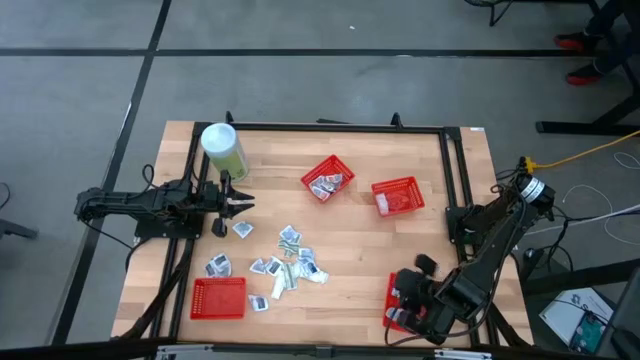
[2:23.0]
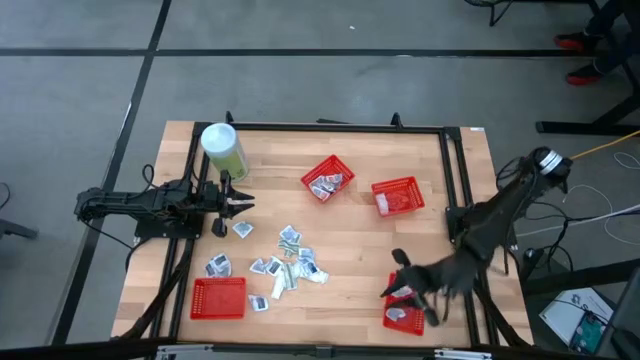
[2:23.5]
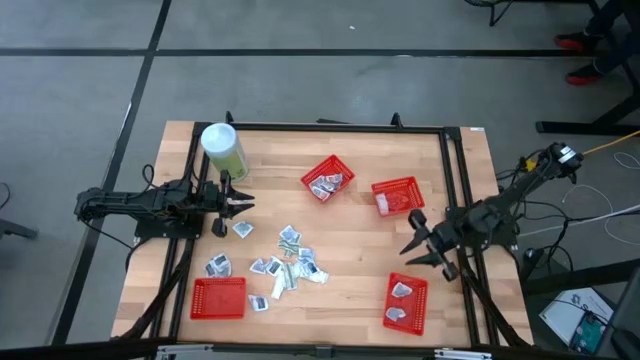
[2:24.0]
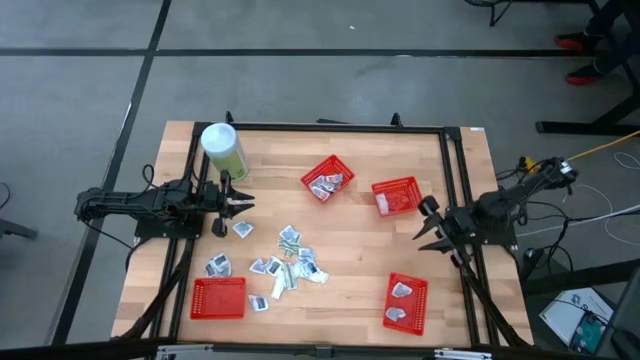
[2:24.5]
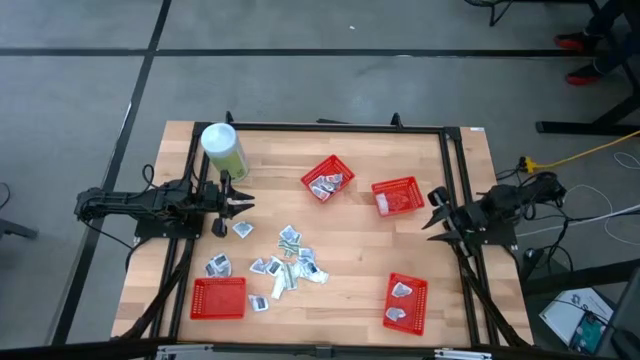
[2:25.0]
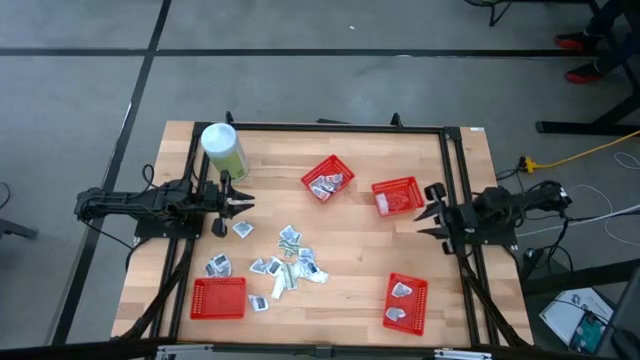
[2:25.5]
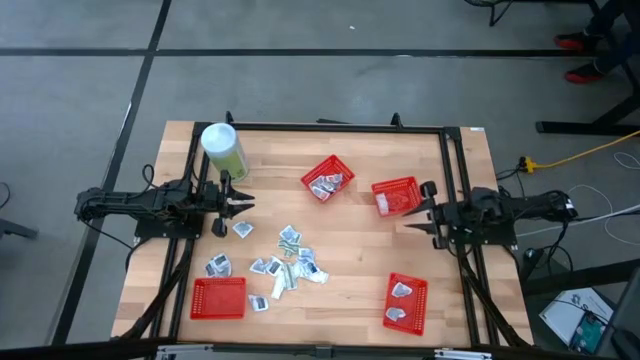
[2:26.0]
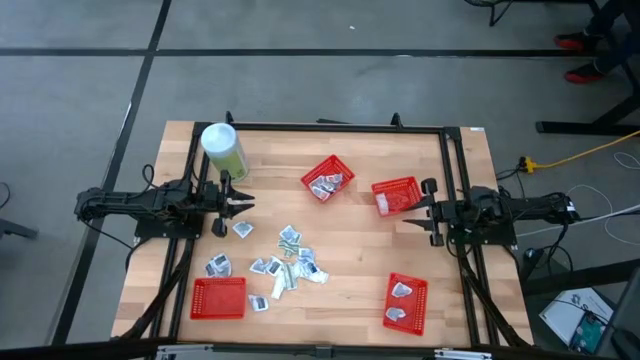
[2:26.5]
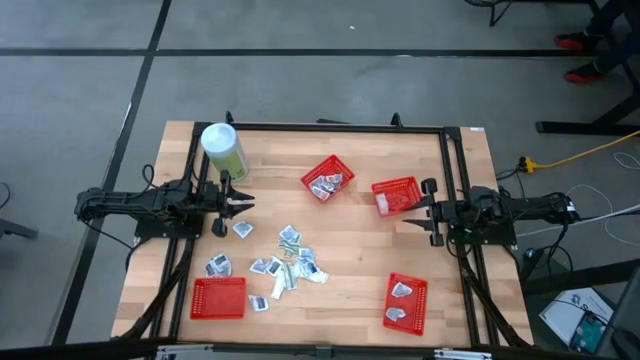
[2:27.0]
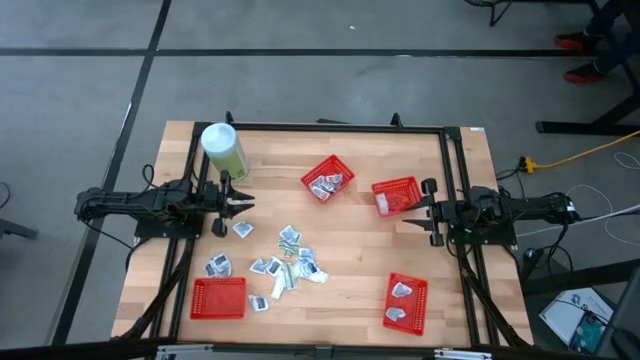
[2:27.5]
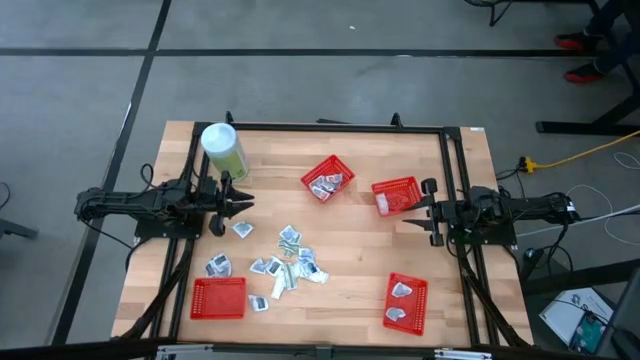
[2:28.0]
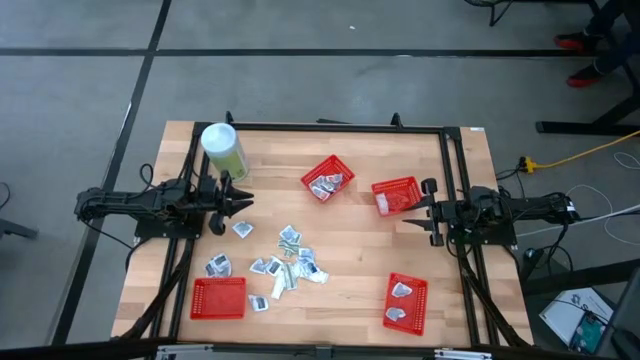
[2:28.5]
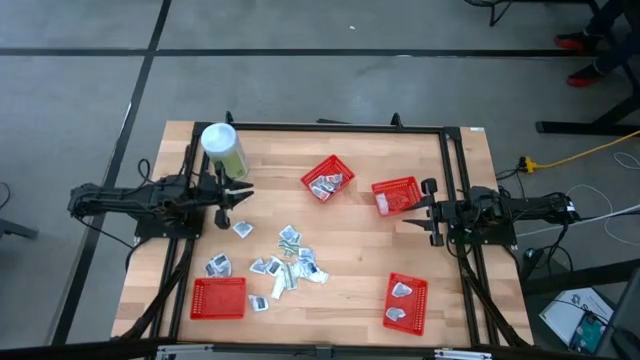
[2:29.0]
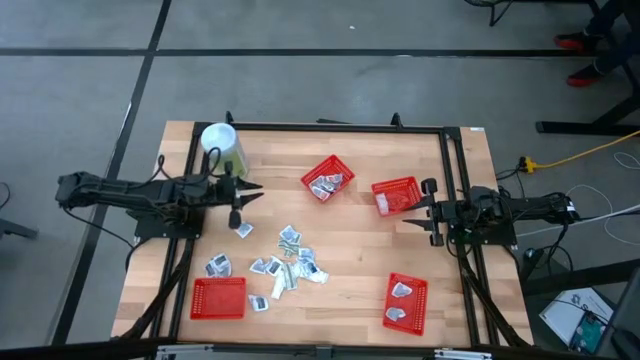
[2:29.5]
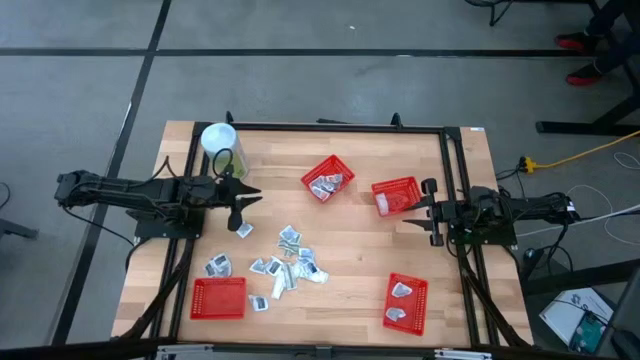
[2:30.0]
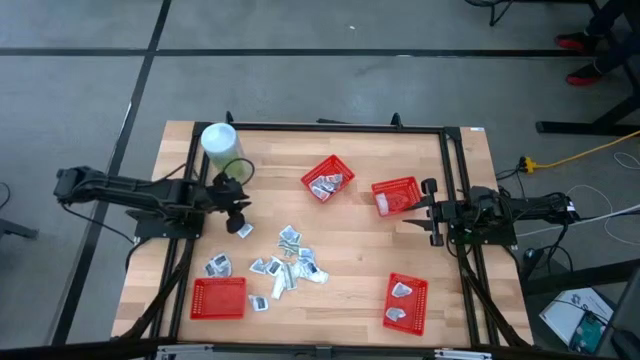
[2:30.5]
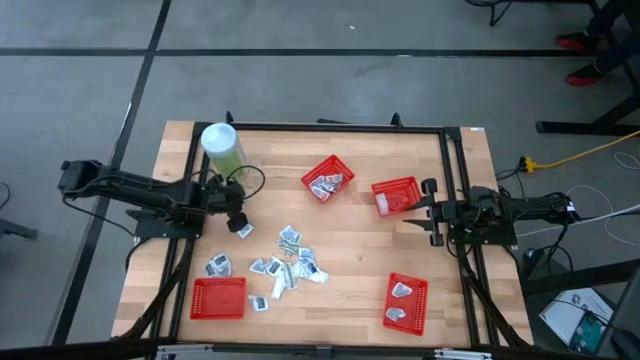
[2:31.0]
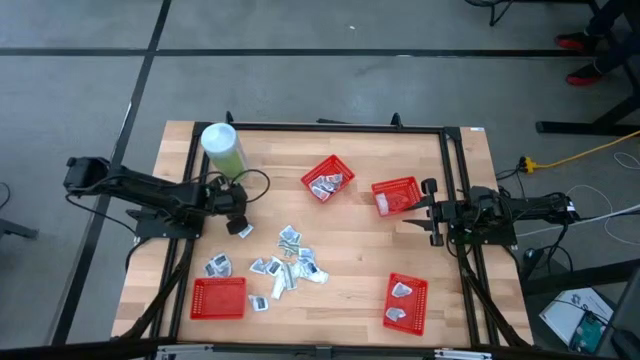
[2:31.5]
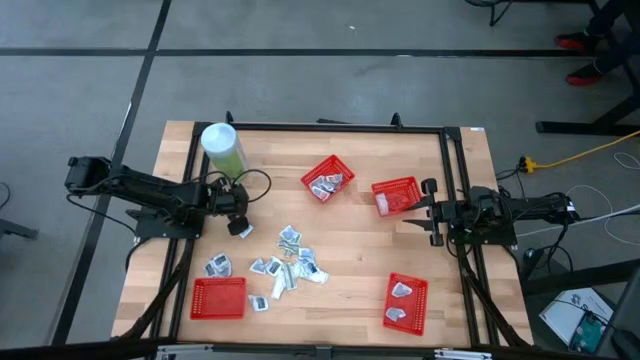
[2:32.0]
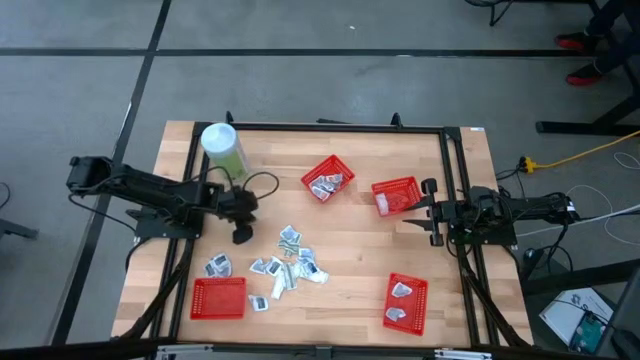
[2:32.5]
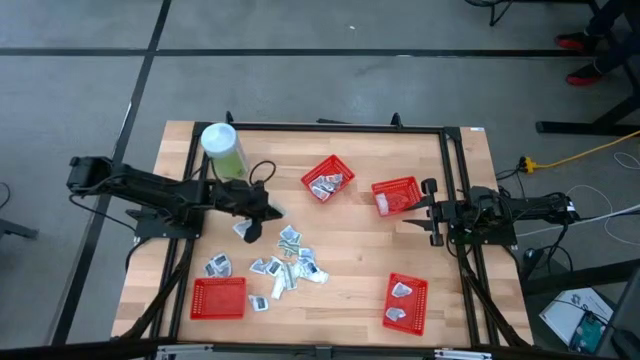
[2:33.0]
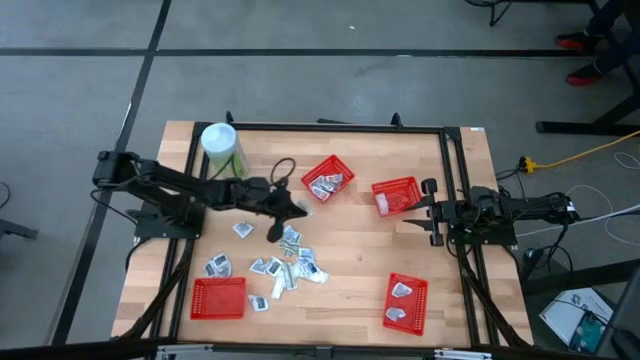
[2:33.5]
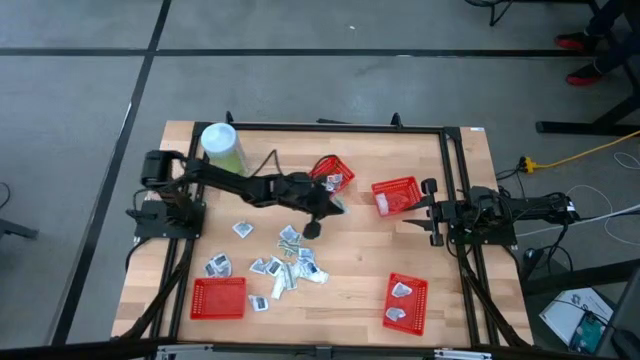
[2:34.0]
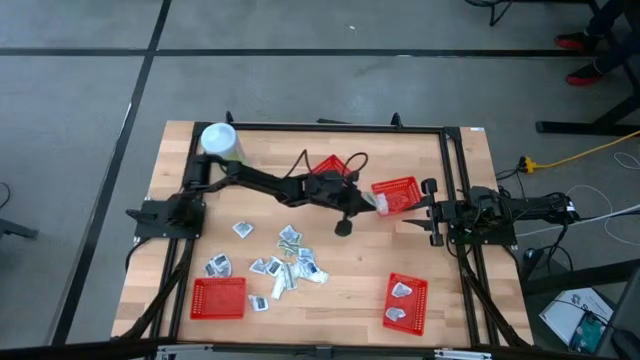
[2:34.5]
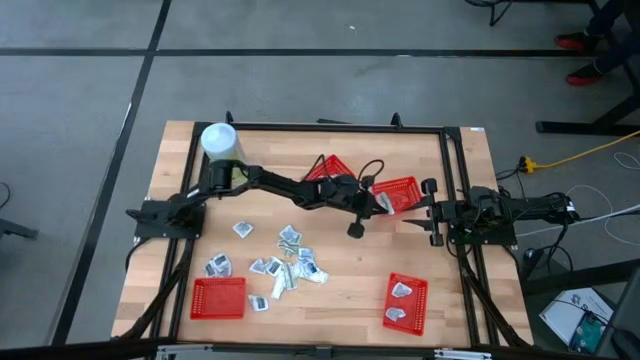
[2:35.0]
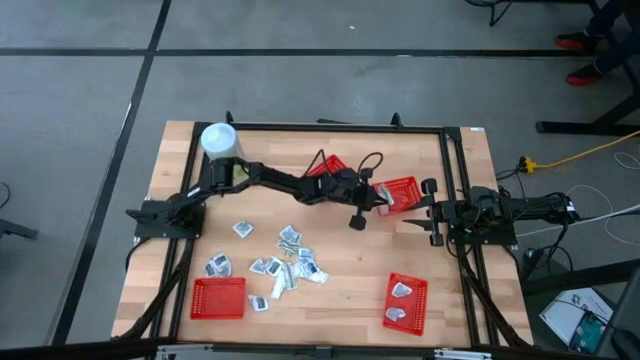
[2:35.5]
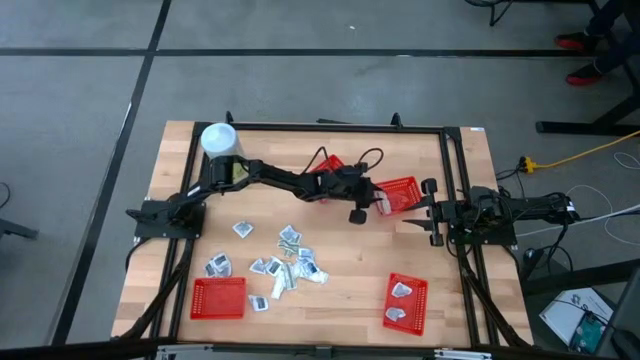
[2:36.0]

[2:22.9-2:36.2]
Task: Pick & Place First Aid Supplies
Put the green bandage into the red container

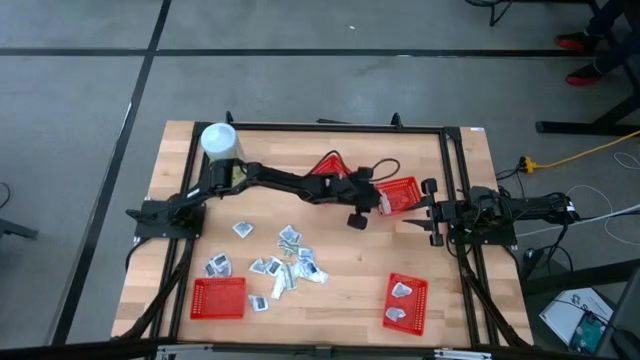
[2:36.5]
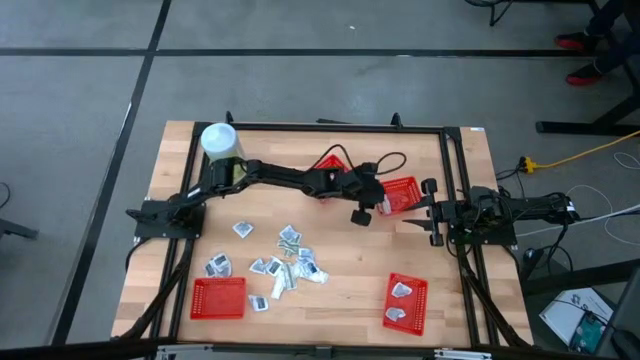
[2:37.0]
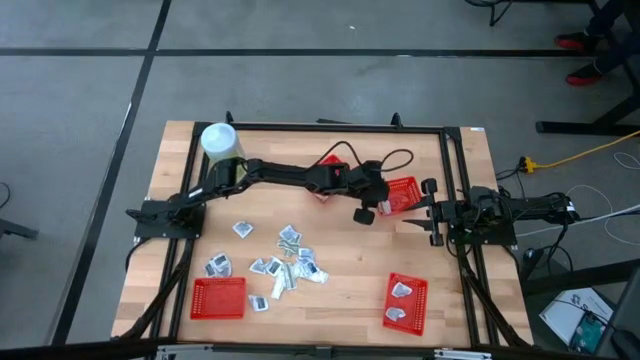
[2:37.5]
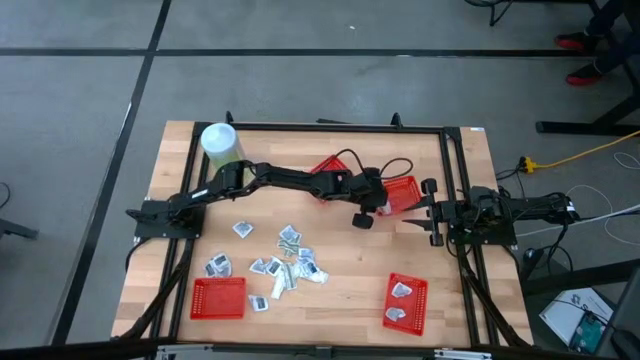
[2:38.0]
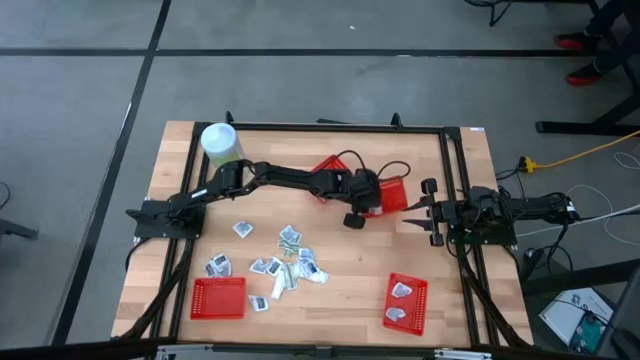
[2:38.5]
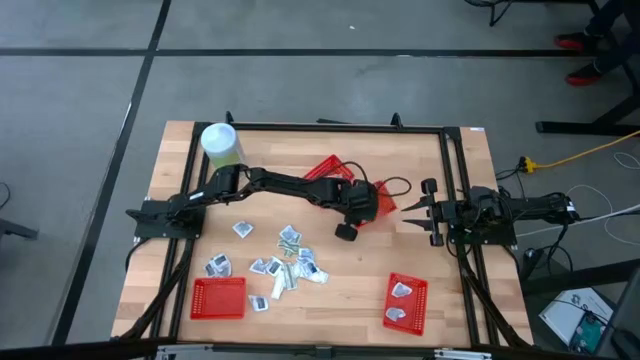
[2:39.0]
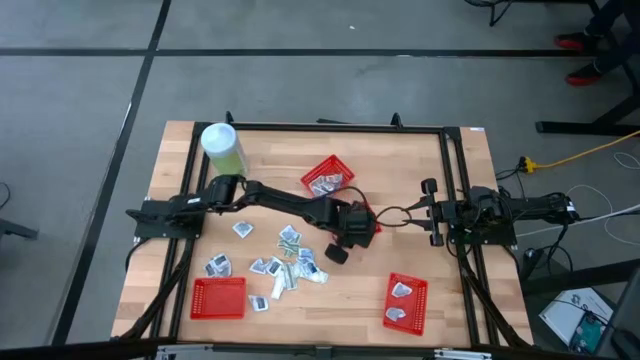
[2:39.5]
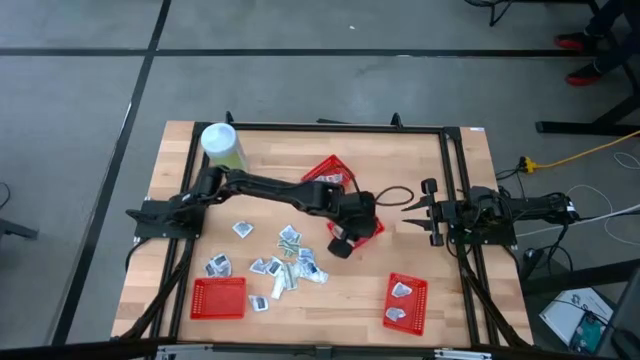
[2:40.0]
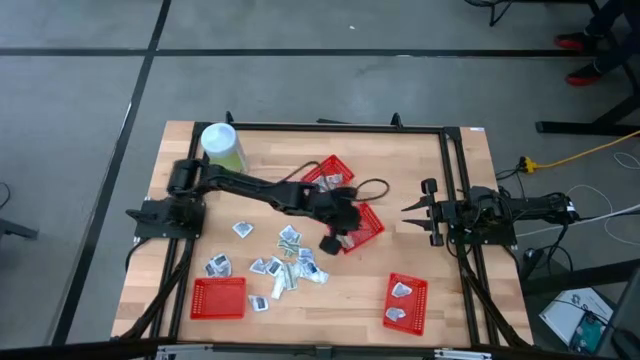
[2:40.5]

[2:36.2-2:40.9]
Adjust the red container

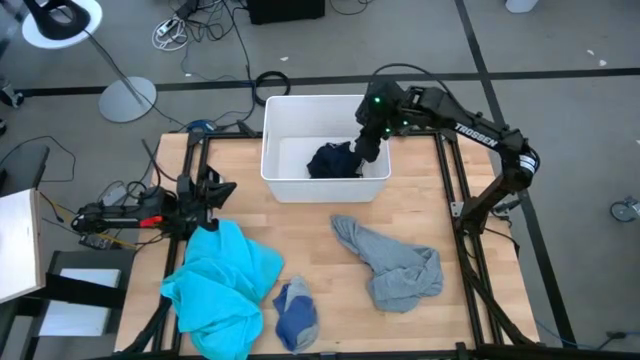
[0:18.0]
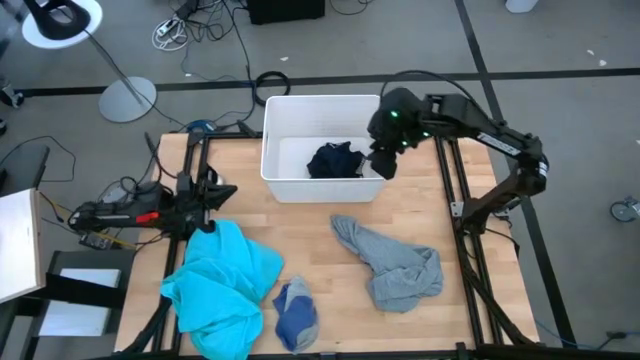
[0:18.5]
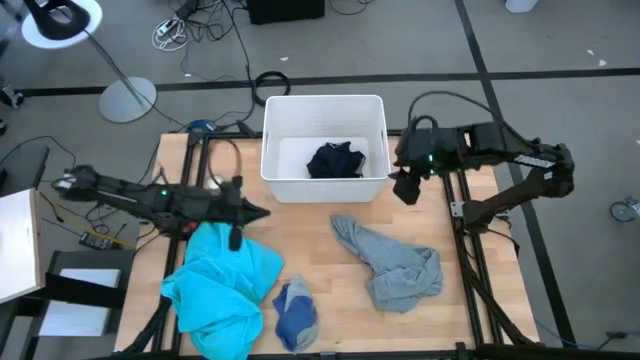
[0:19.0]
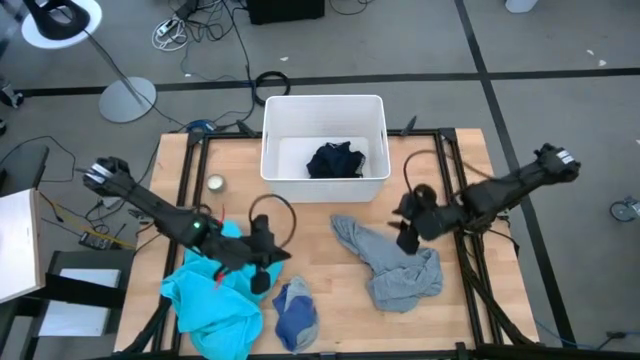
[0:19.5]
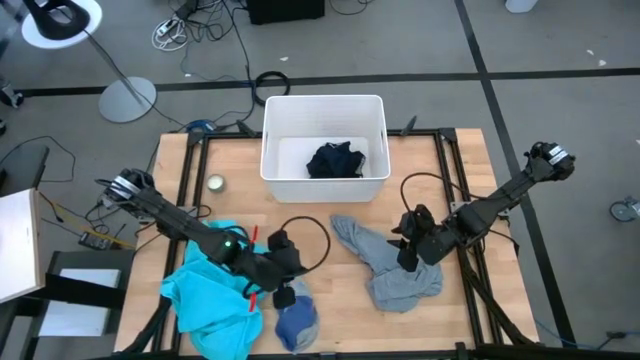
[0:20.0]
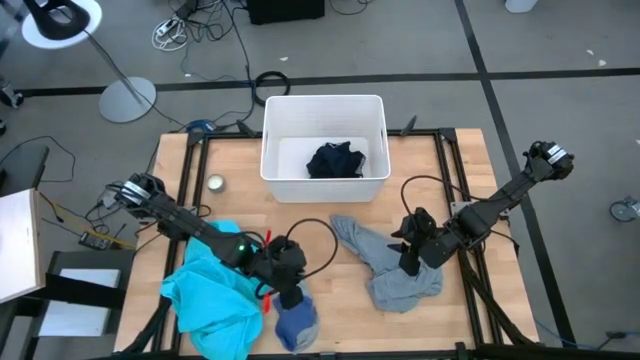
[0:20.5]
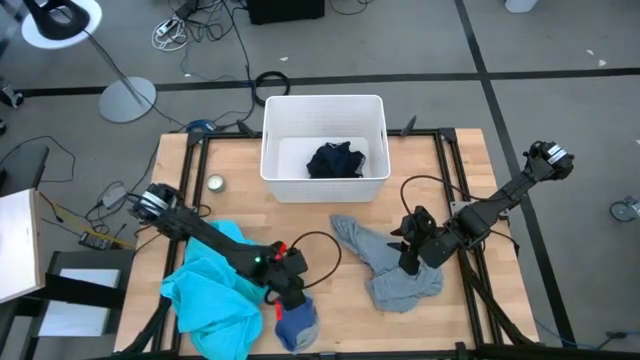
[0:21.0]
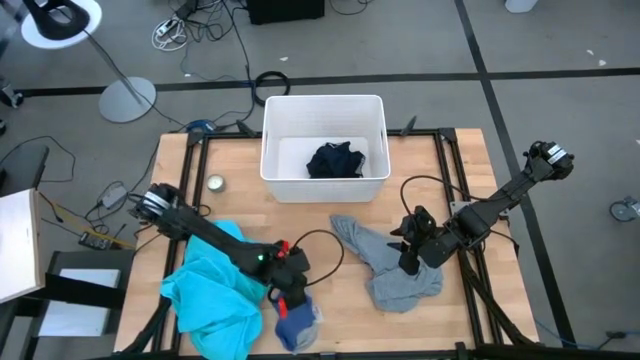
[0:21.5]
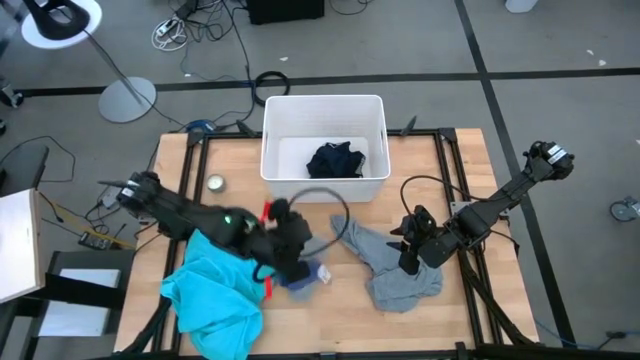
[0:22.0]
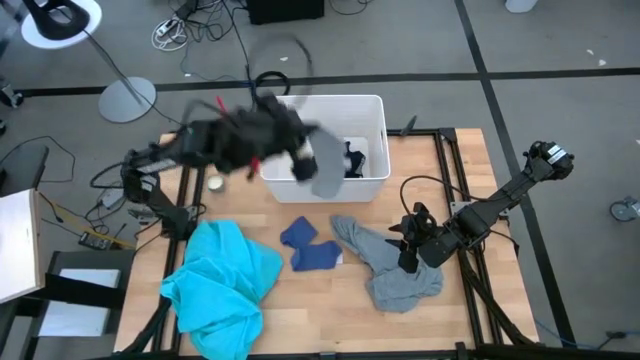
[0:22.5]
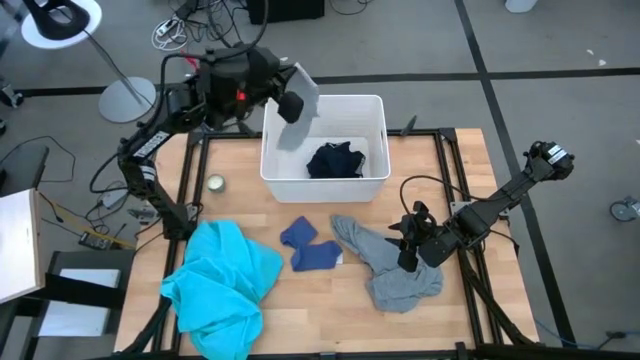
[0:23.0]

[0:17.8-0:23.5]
Task: Sort clothes
Put the gray sock into the laundry bin
